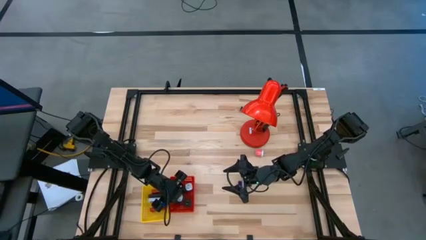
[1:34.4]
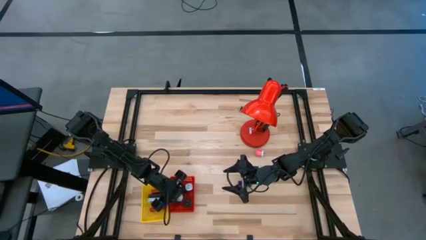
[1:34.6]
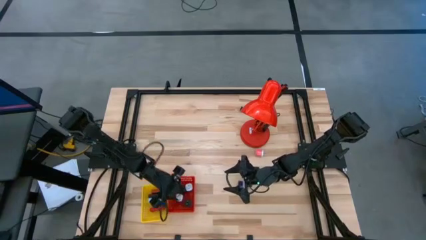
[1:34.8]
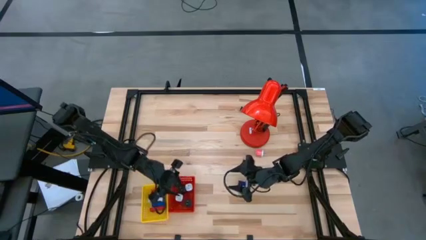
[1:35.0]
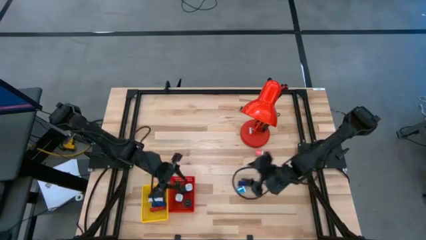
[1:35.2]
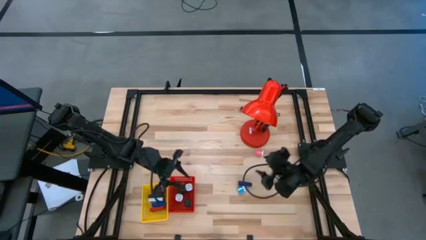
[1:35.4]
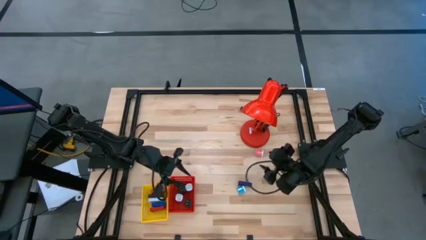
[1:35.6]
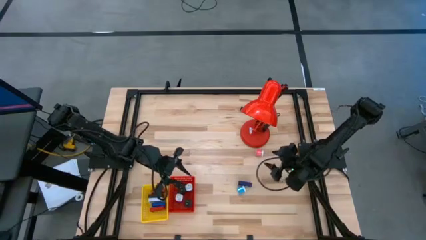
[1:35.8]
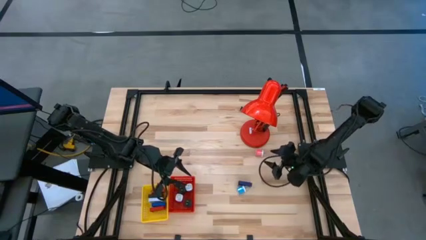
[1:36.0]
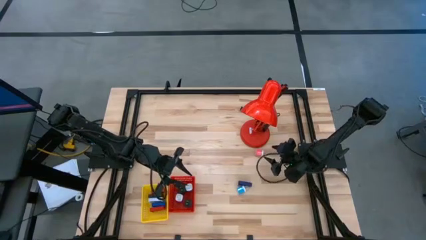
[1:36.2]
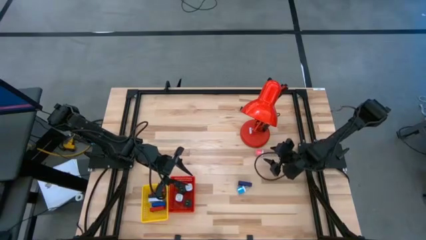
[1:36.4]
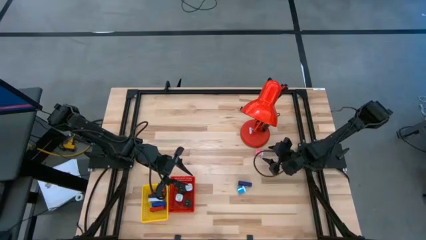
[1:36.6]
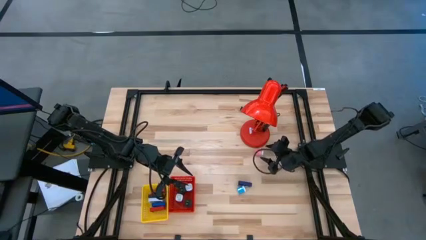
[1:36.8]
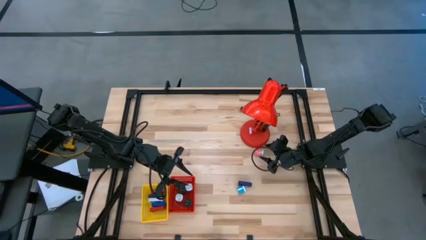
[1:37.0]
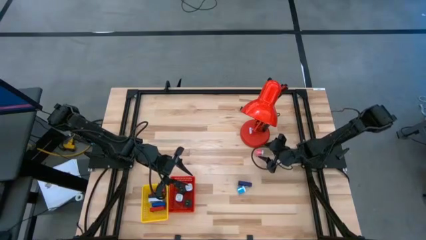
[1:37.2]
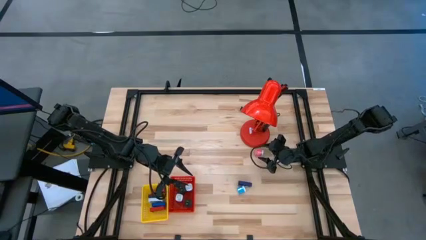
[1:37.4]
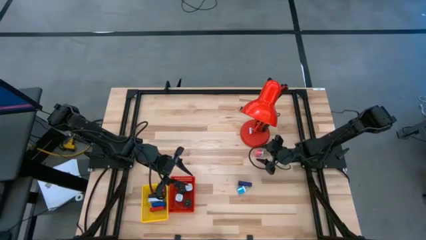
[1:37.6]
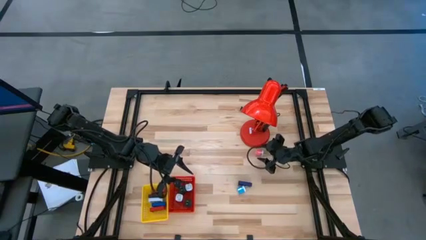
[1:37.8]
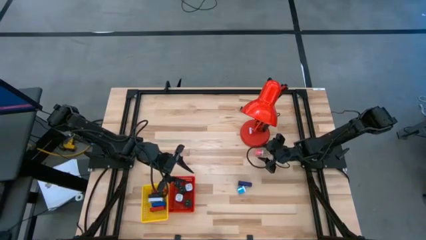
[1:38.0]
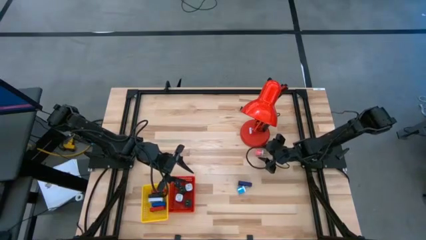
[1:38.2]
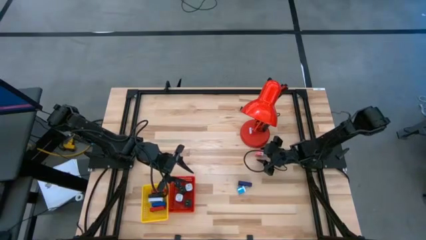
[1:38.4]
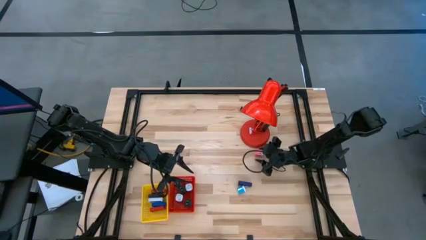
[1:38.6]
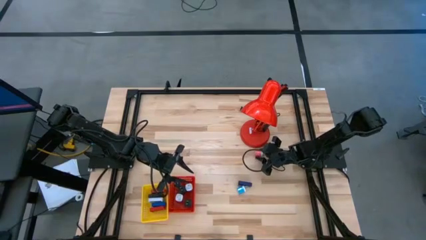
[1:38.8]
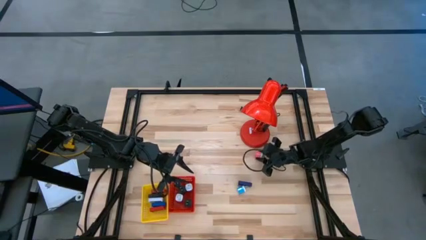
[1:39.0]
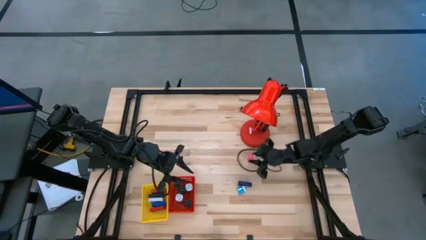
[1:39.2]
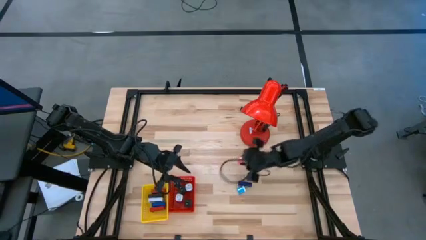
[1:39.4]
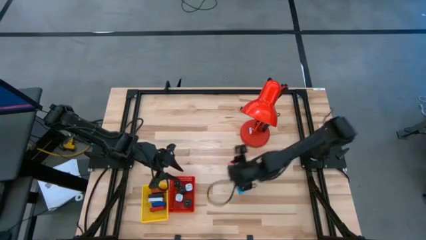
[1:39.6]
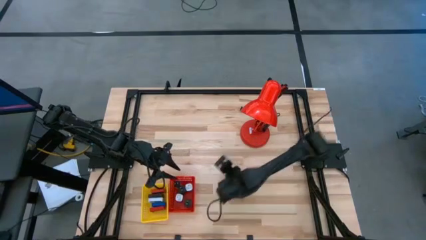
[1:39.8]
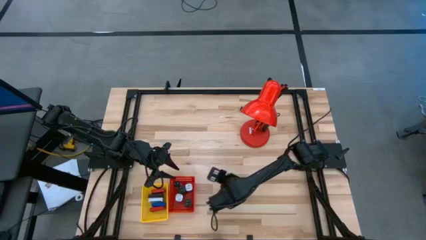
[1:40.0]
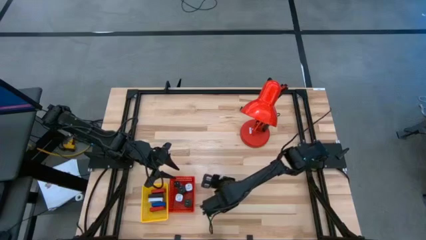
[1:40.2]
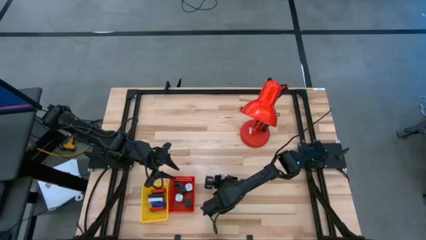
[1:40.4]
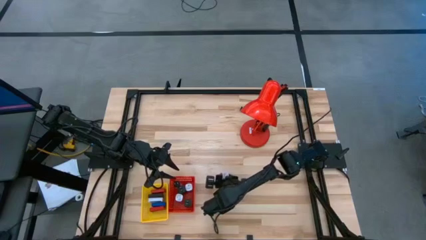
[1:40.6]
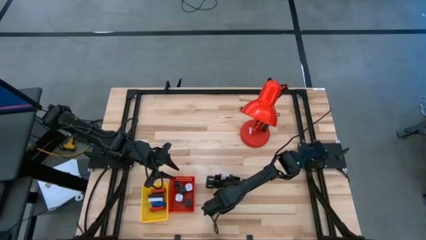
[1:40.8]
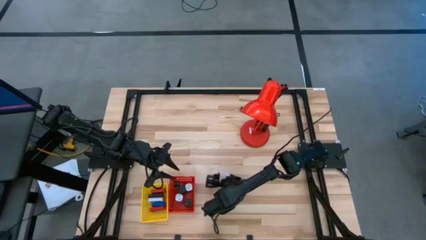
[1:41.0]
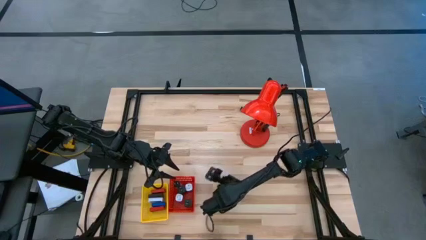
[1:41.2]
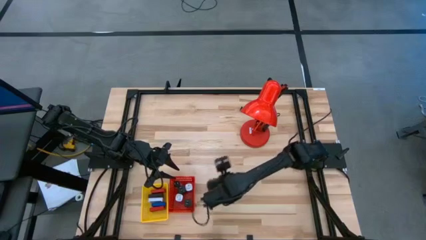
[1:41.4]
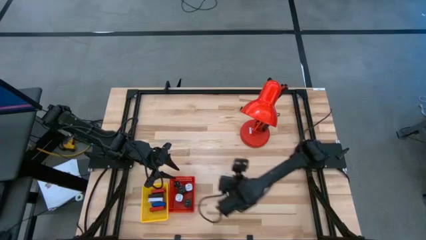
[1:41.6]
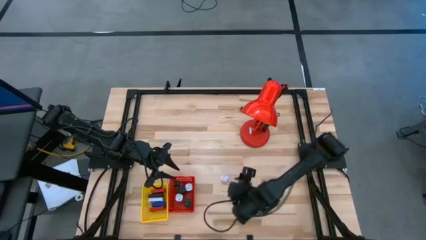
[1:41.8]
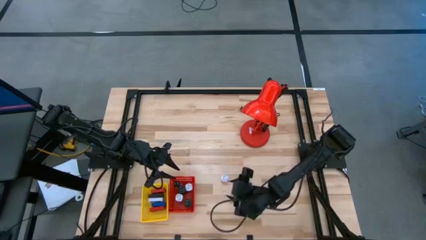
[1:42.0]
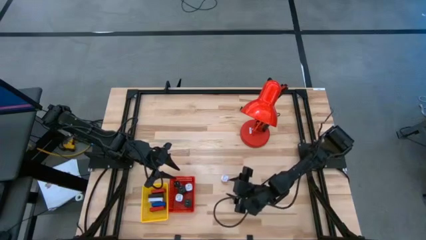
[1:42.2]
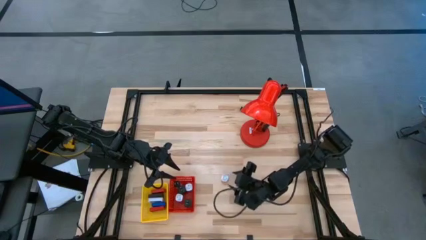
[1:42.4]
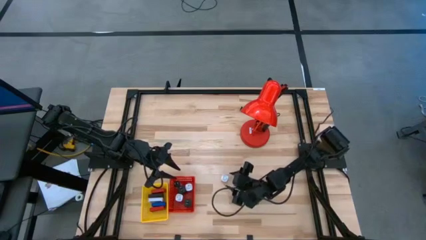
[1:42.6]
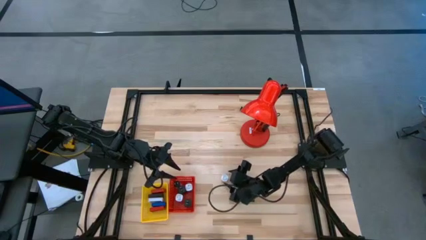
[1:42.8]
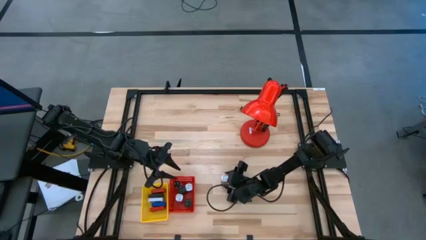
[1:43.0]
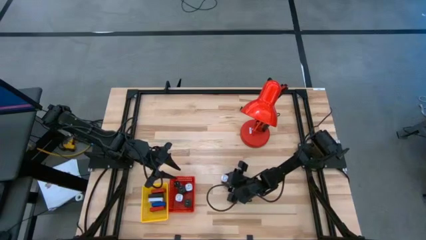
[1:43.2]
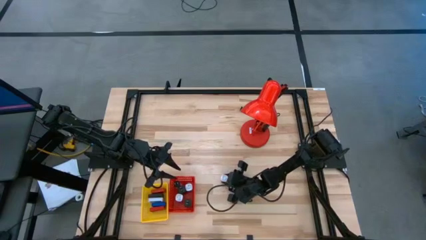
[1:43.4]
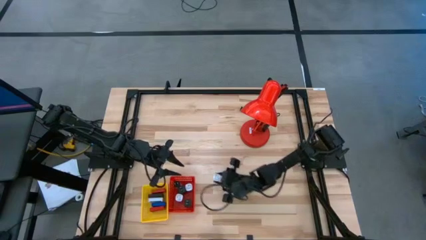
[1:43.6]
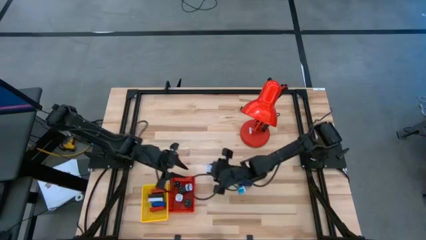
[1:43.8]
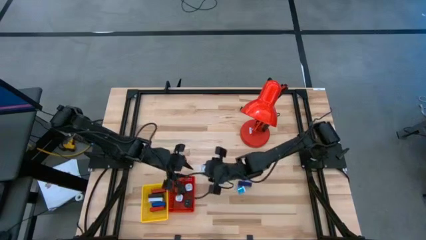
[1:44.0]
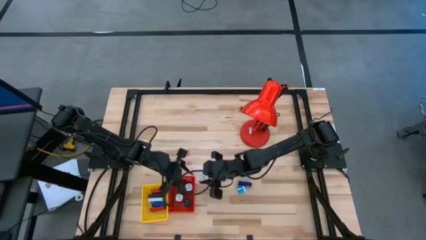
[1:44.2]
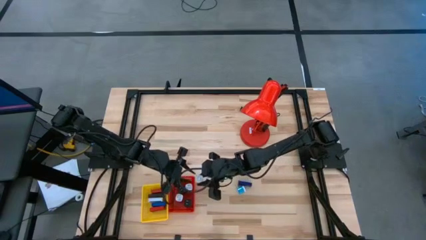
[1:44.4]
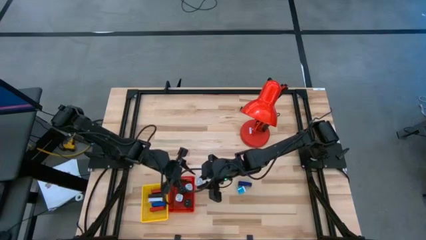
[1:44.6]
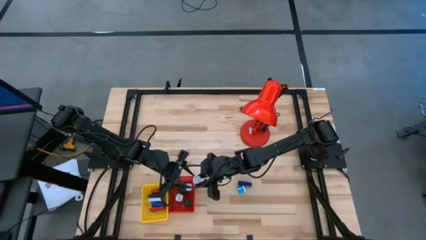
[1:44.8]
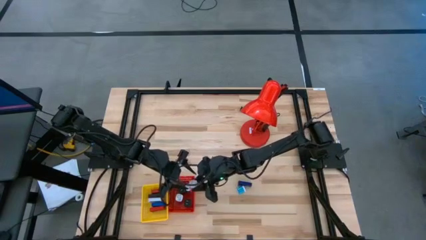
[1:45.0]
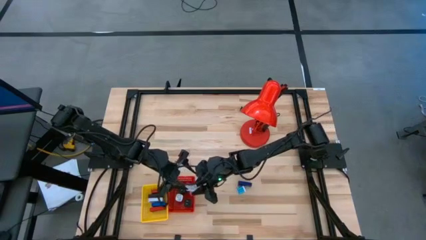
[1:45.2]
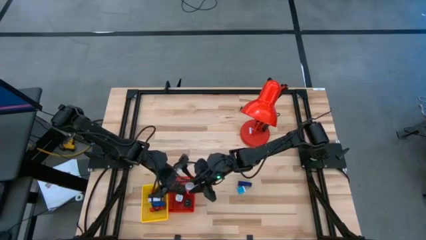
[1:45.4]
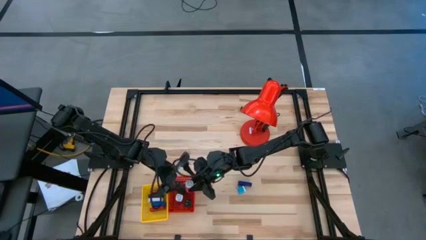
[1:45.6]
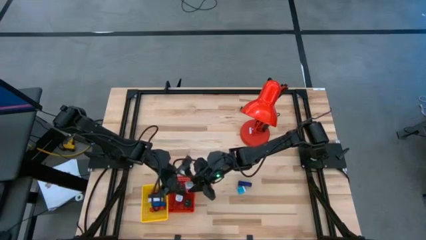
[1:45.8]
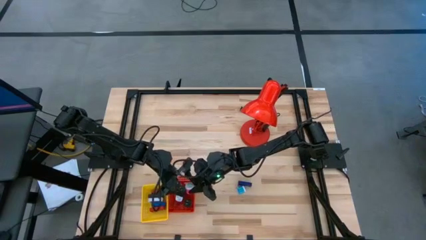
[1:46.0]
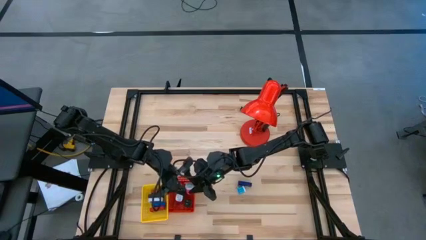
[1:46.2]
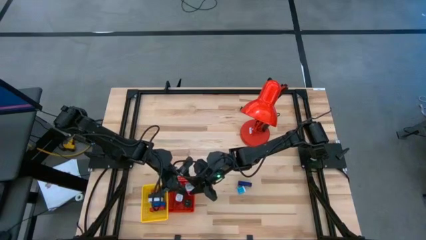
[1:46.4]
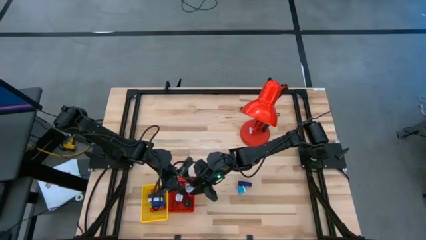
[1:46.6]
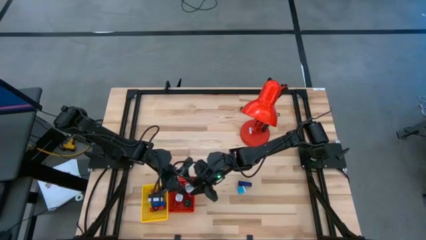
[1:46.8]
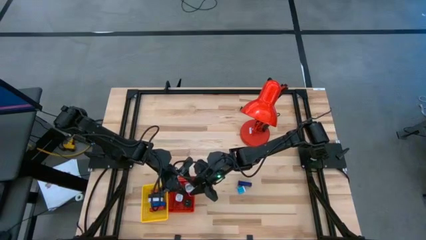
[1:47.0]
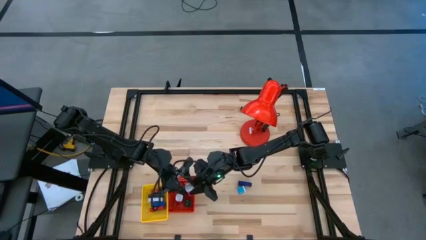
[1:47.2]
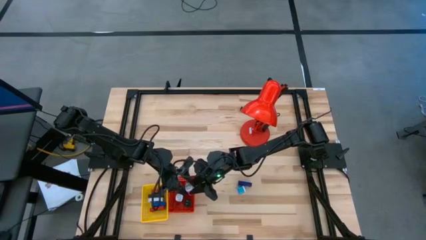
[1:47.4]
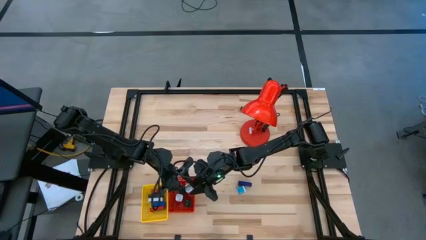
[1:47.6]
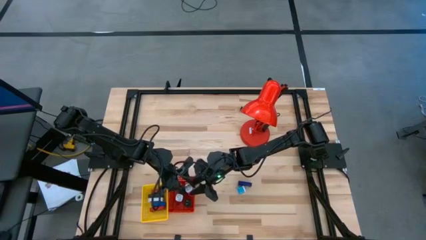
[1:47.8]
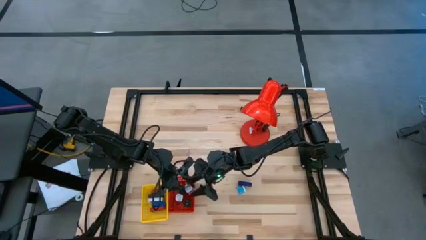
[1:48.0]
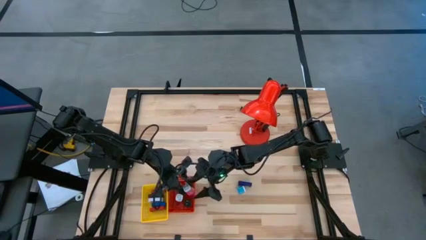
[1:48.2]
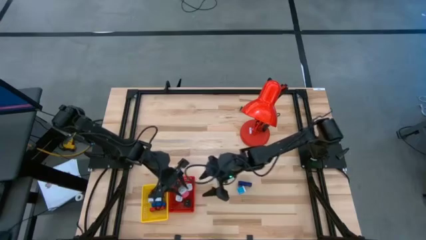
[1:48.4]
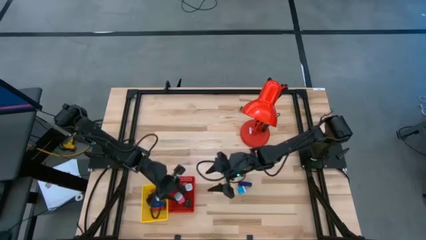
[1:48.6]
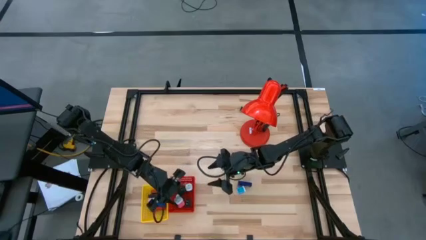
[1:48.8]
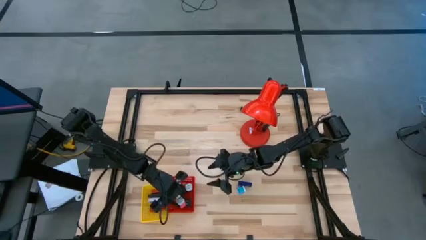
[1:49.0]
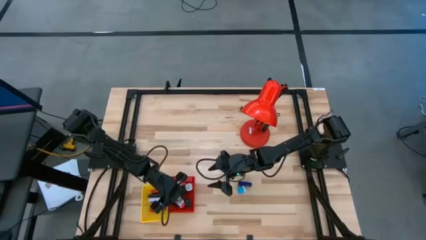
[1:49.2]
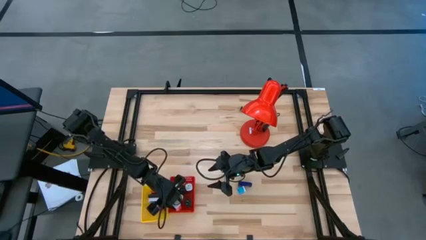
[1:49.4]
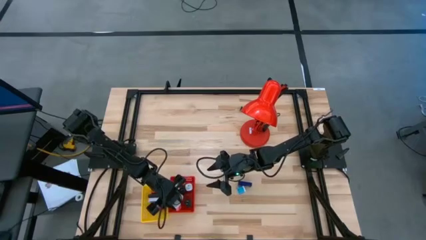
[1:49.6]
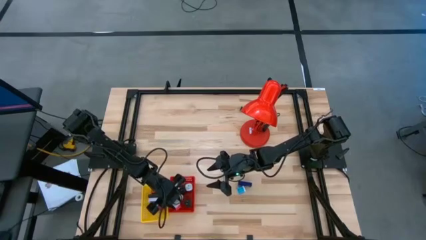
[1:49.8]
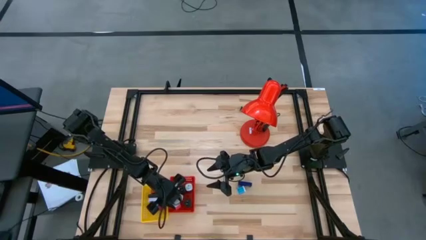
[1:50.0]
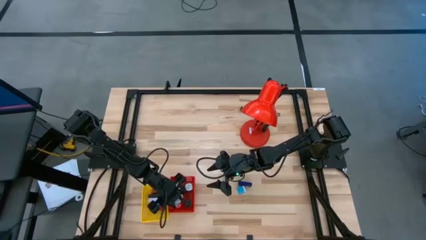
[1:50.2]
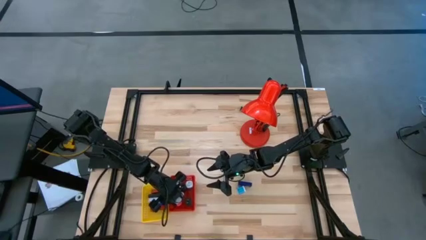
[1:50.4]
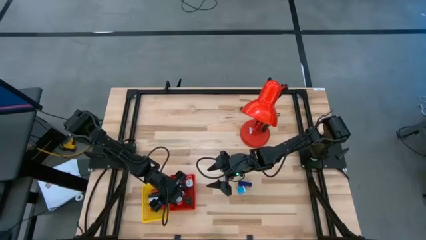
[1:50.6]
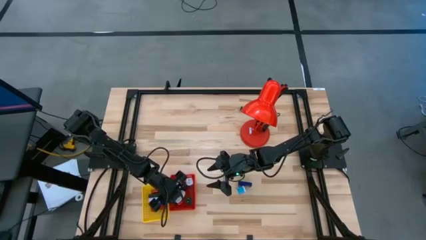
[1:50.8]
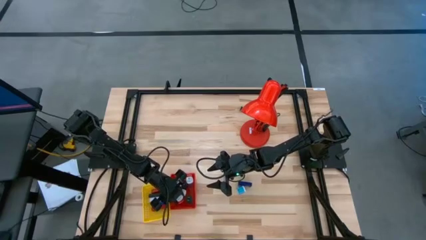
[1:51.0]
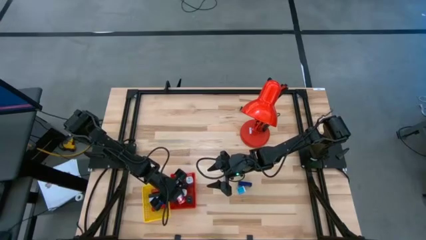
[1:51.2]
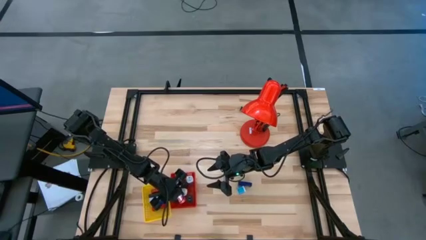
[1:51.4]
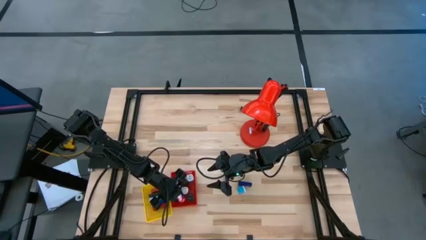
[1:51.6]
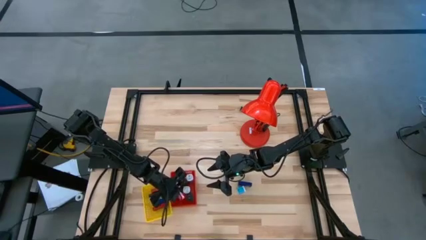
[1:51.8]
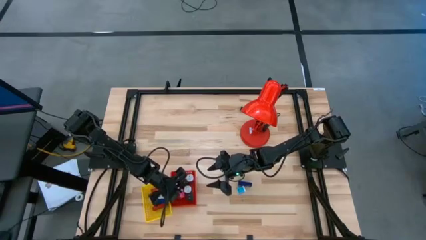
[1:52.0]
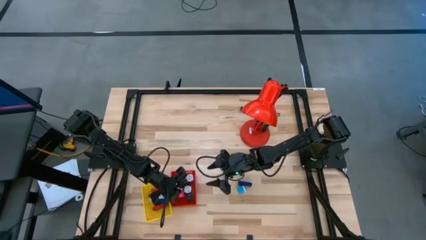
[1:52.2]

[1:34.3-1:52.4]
Task: Pick & Place Office items
Put the pink charger adapter into the red bin
